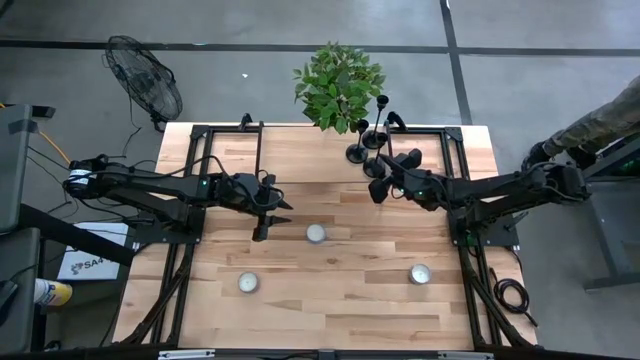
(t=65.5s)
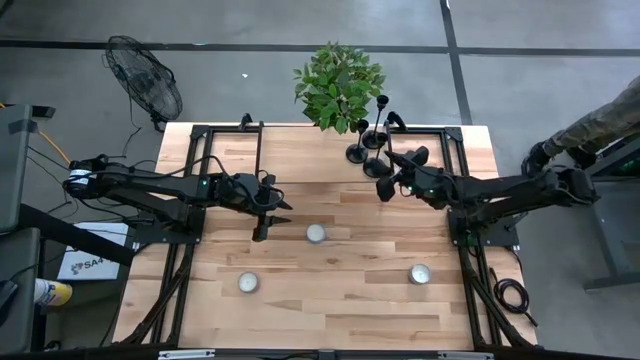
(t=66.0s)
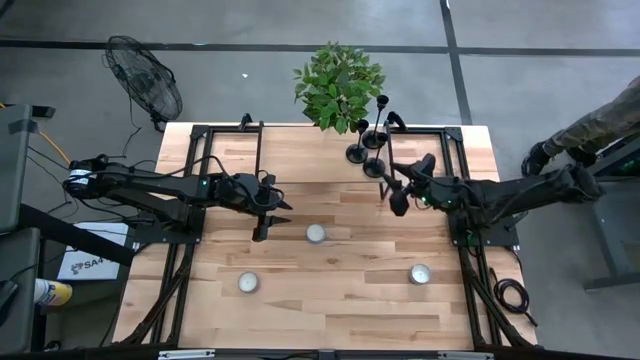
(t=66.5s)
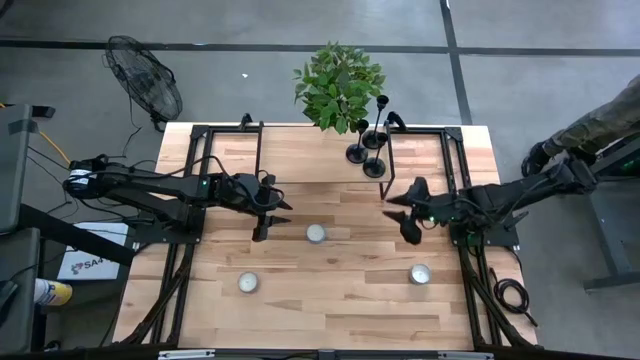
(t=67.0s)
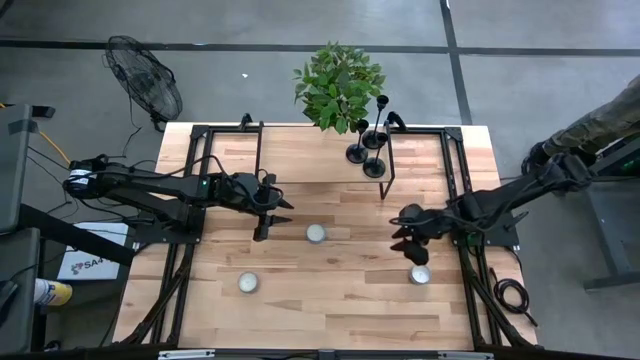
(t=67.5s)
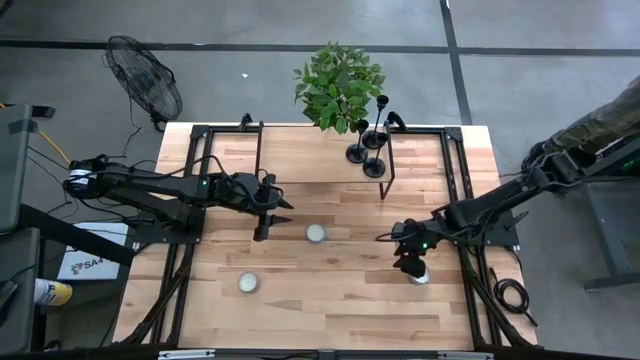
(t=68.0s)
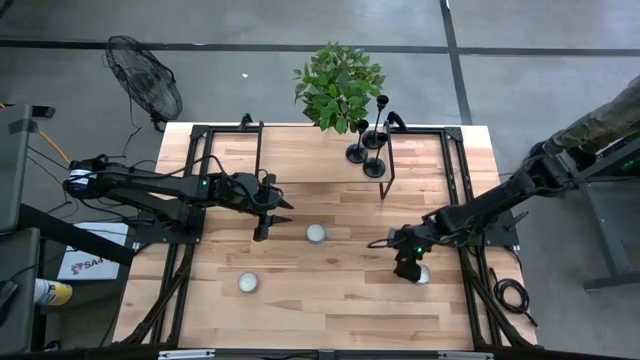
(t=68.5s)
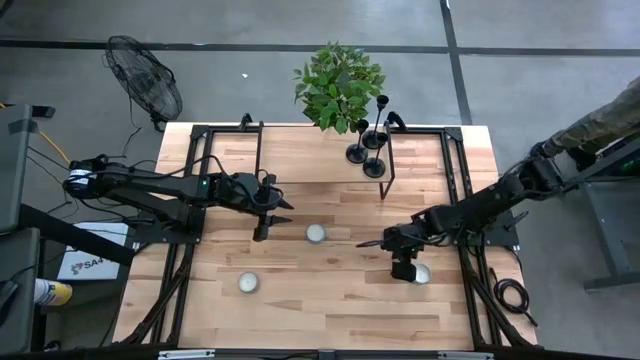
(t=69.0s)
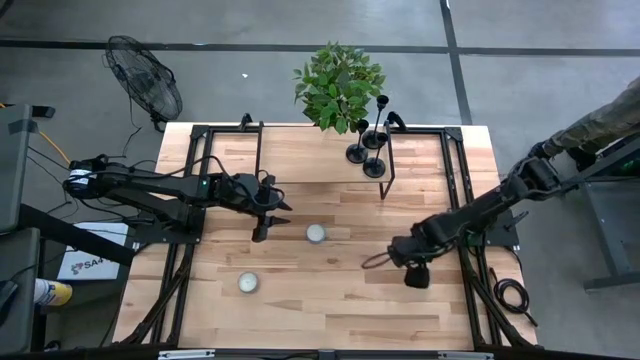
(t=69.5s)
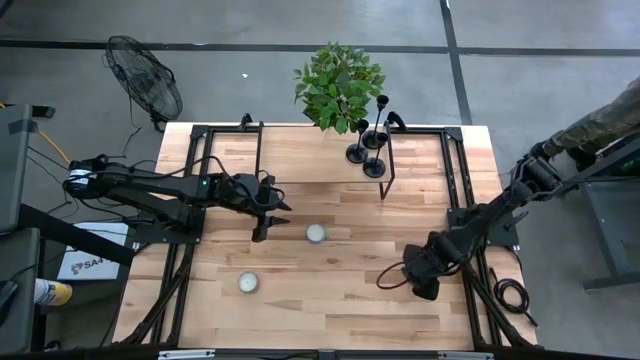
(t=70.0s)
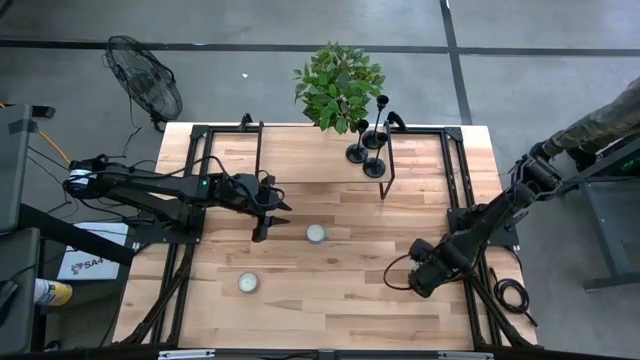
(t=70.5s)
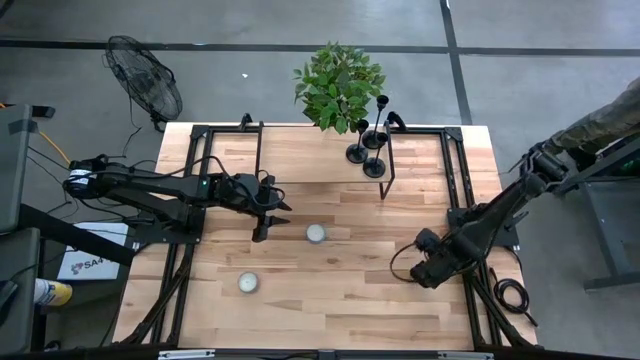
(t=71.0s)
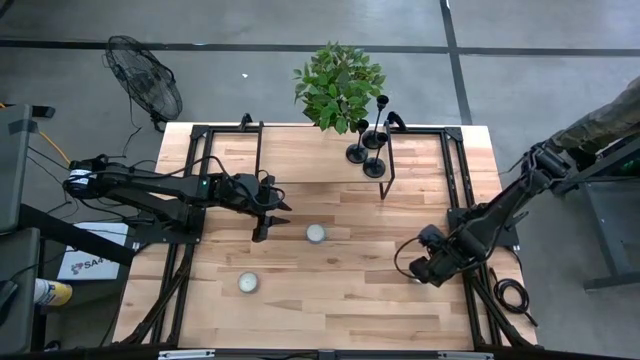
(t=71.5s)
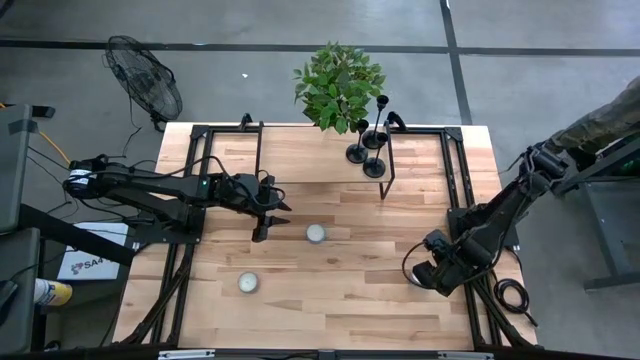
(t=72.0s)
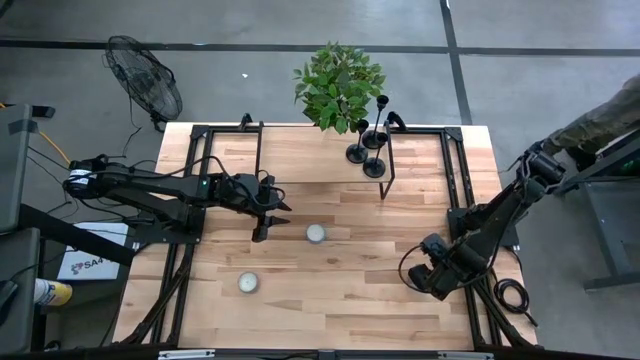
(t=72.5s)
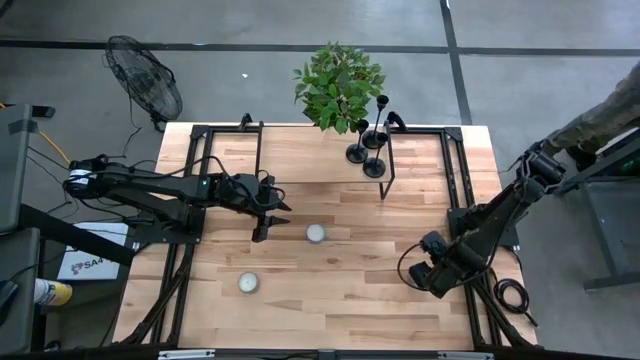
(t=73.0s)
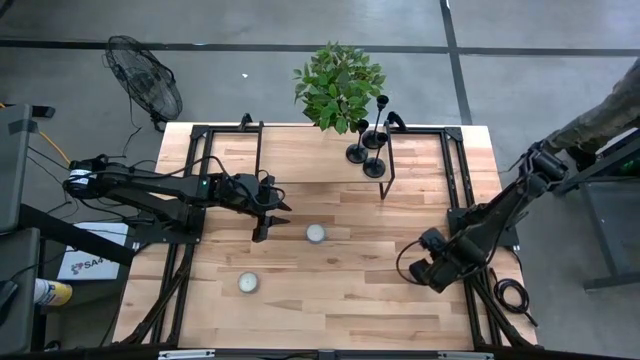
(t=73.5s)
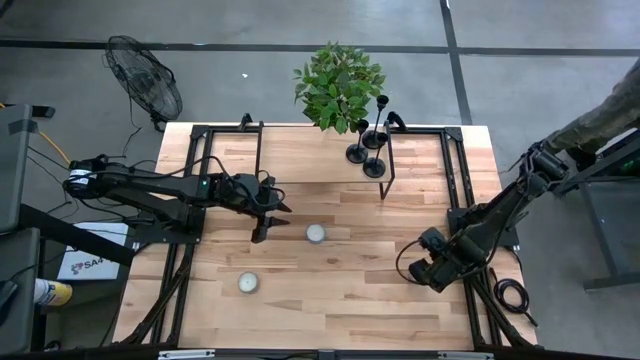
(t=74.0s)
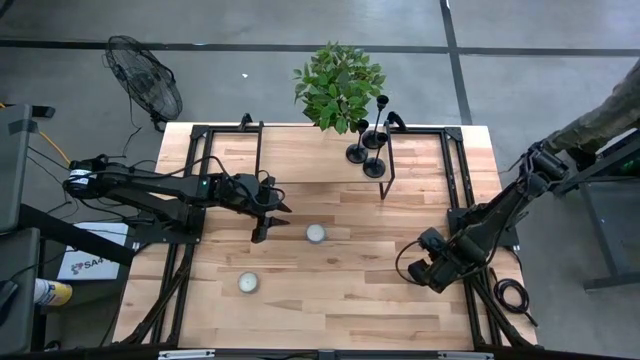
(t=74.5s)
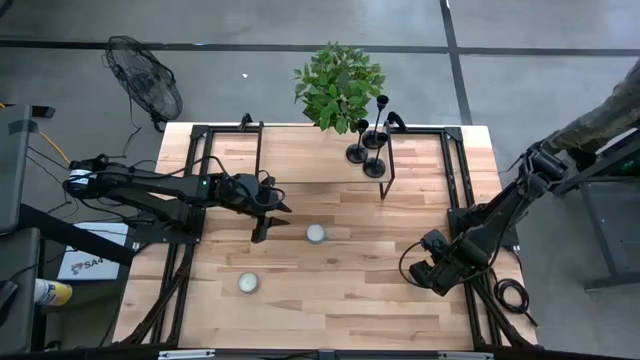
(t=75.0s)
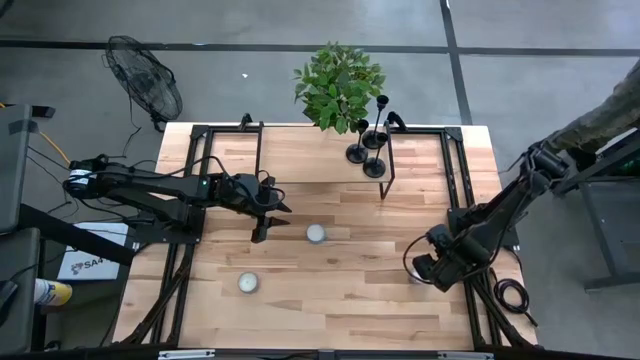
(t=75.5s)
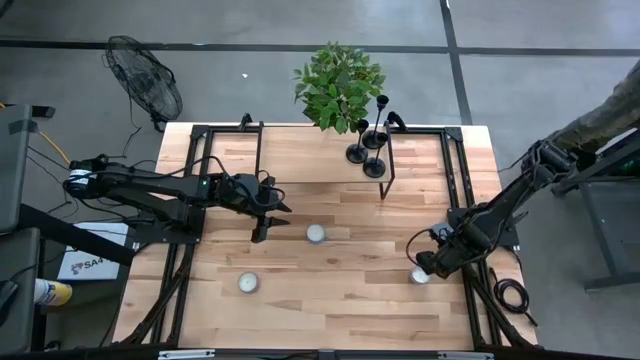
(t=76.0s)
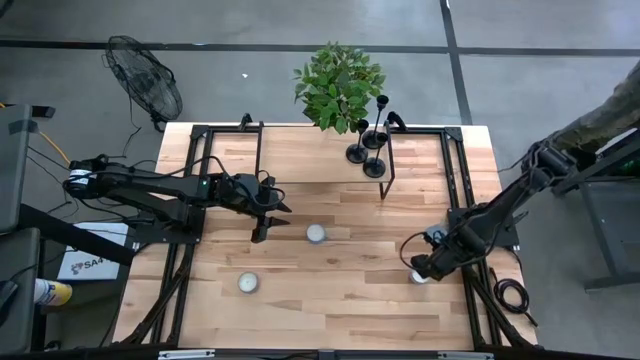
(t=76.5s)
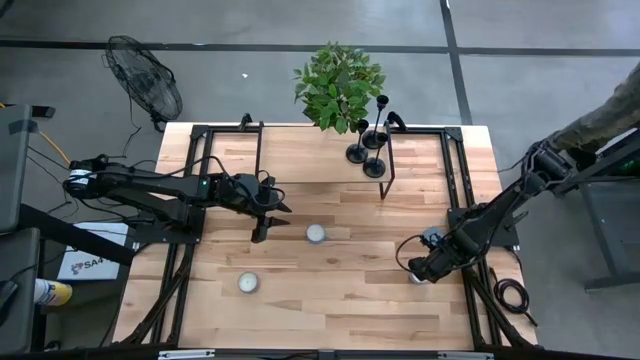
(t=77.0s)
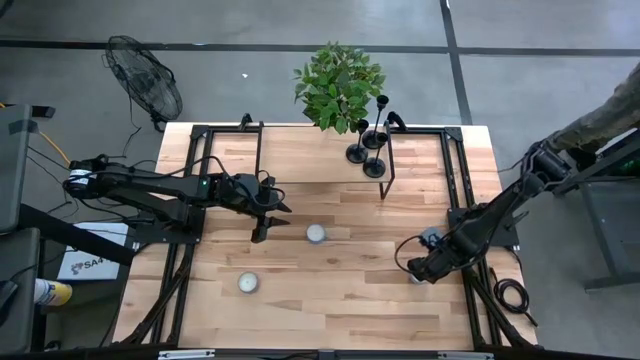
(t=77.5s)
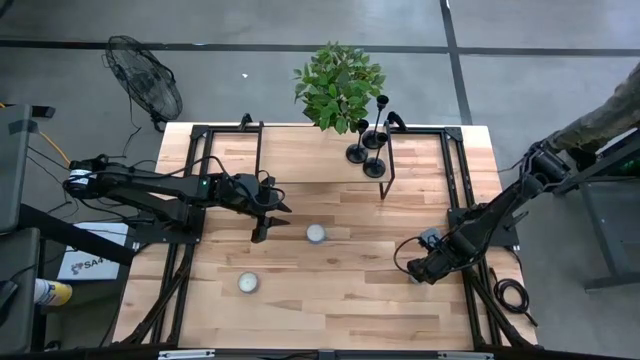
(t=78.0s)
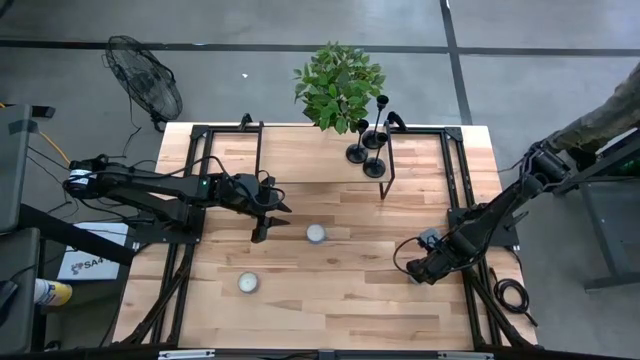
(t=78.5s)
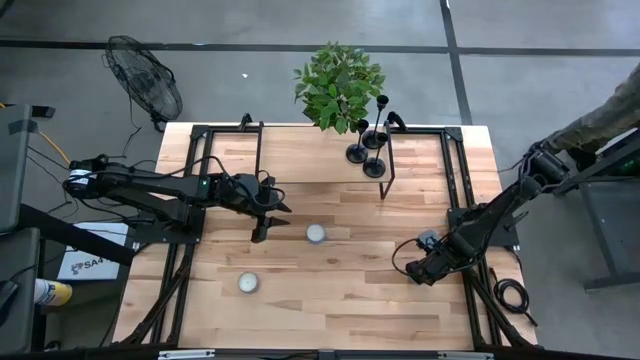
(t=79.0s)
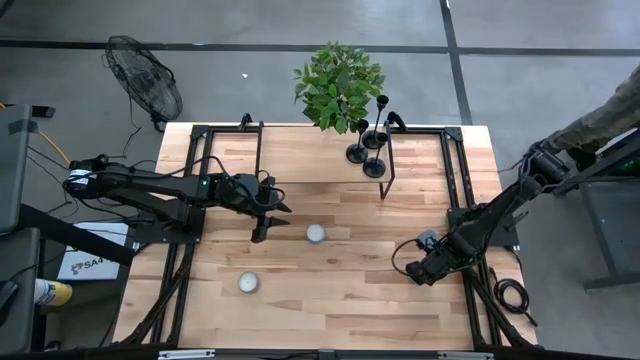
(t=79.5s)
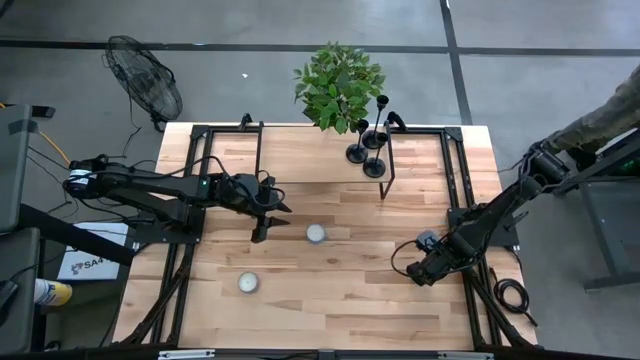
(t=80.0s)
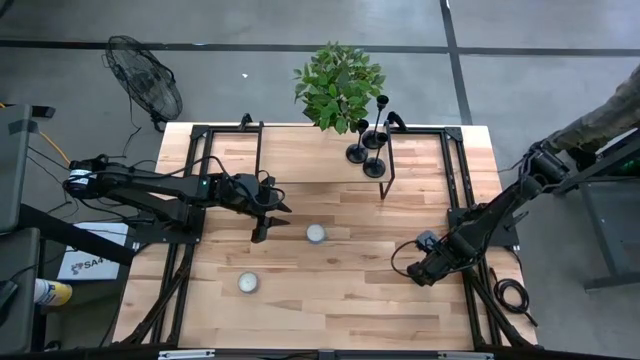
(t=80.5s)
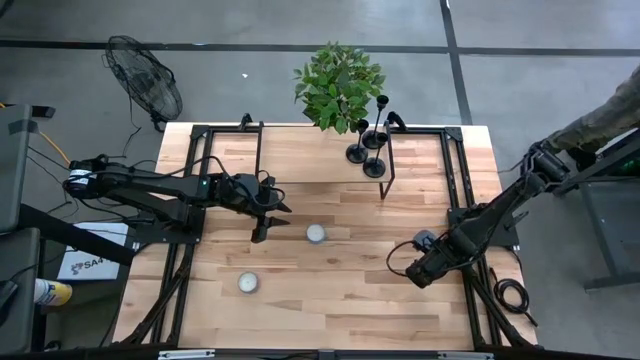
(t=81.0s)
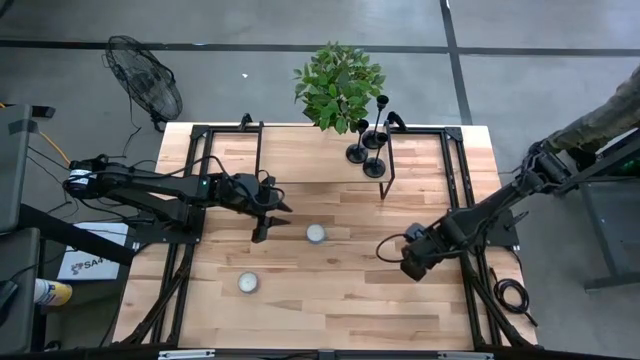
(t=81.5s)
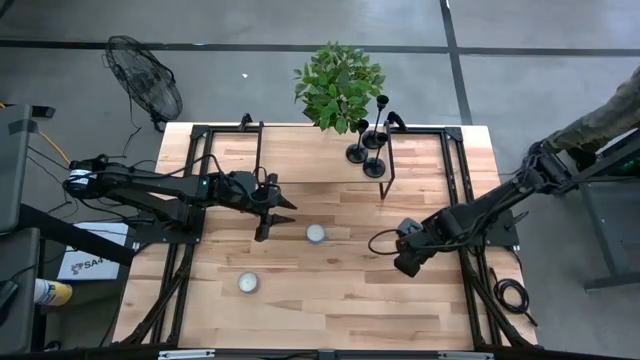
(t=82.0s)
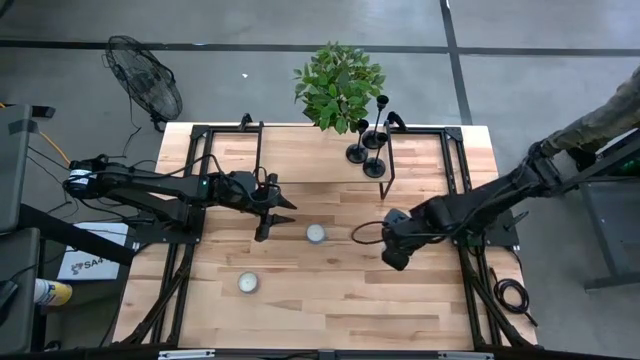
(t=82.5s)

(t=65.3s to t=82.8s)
Task: Pick & Place candle stick holders
Put the white scented candle on the shelf

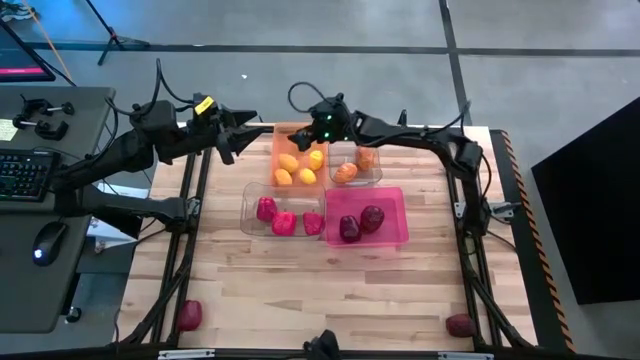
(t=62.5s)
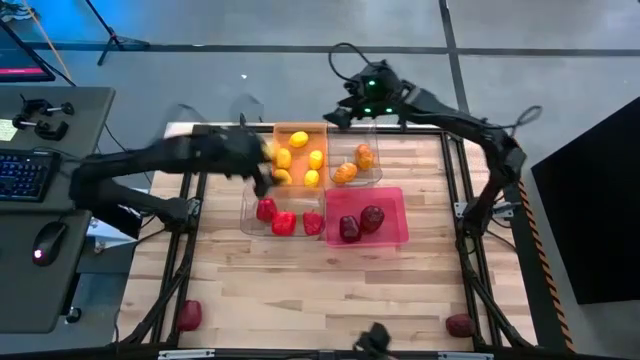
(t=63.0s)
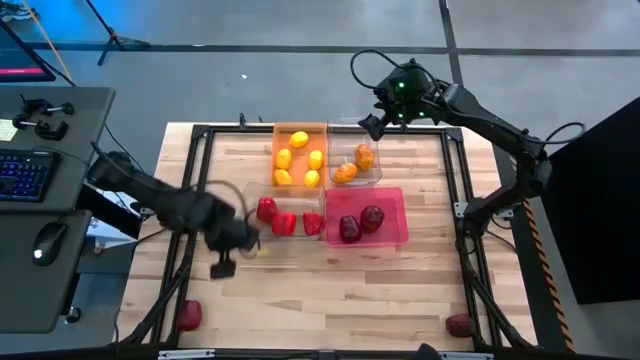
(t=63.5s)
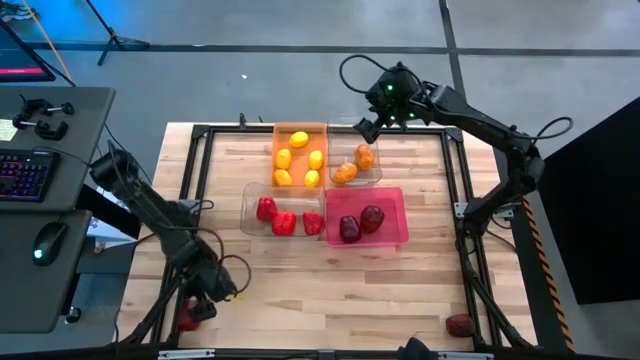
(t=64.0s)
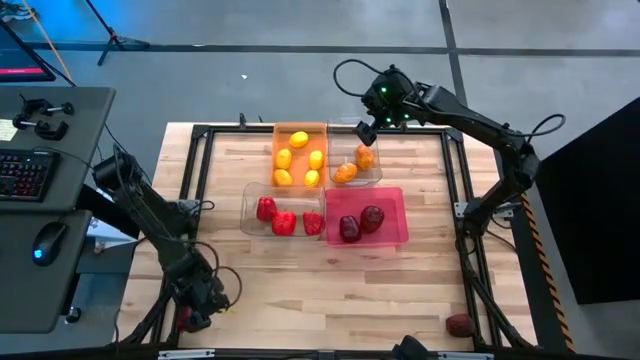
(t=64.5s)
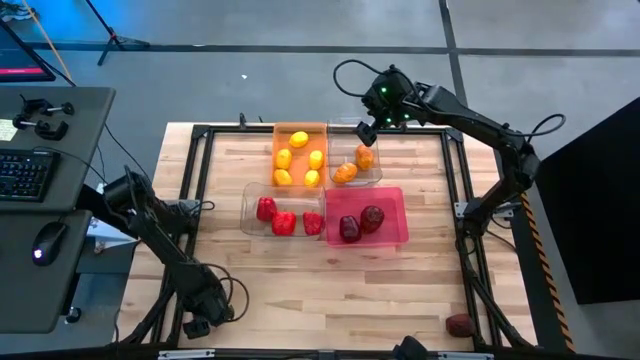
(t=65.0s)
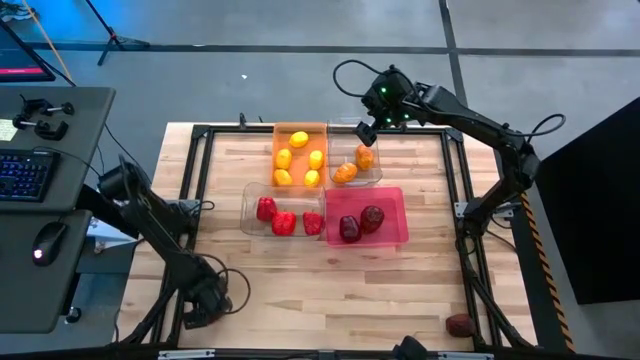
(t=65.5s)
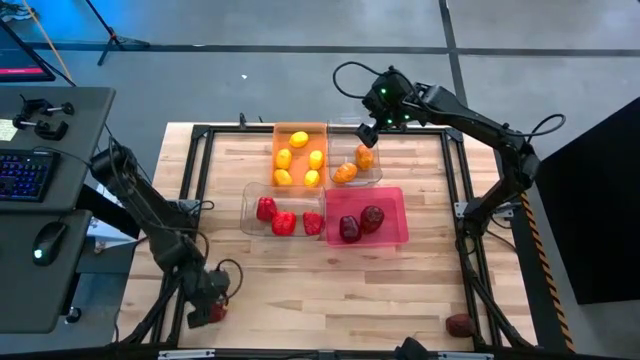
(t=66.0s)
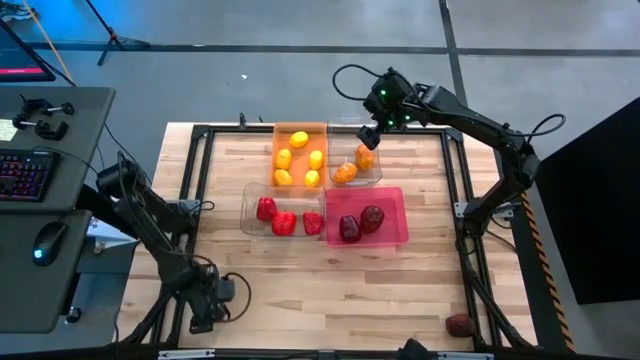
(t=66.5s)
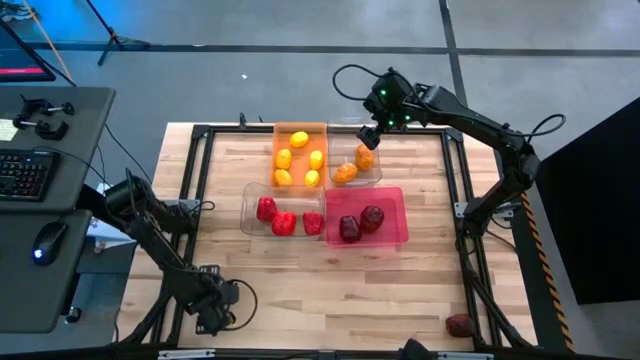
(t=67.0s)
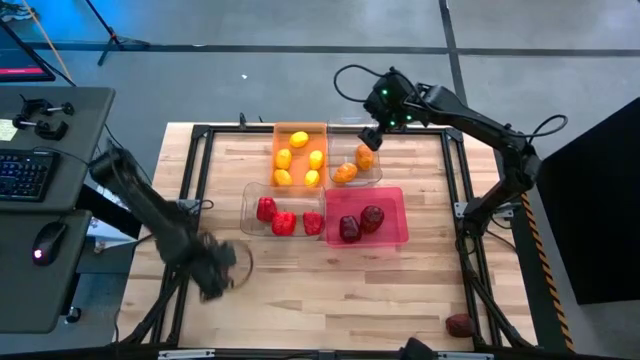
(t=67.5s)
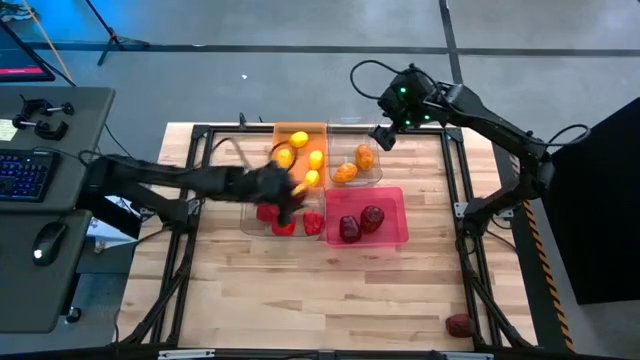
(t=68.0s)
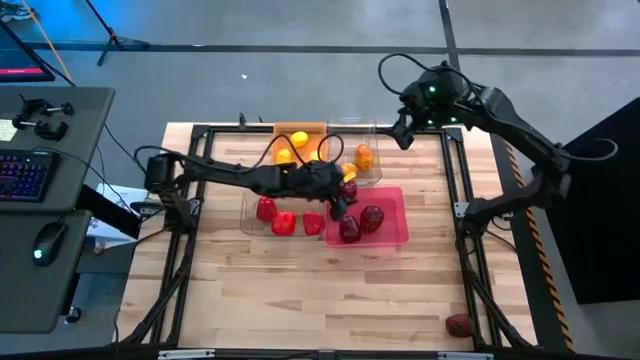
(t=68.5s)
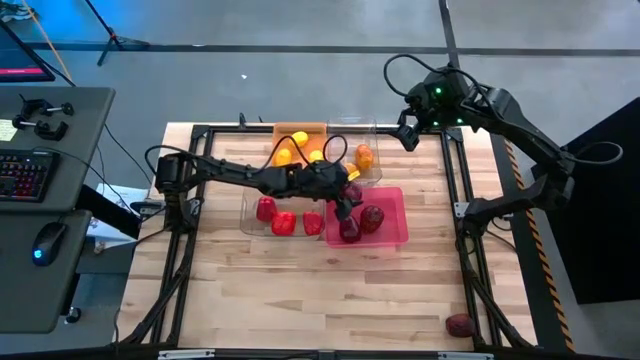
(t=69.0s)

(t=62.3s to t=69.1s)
Task: Sort produce into baskets
Put the red apple into the pink bin
